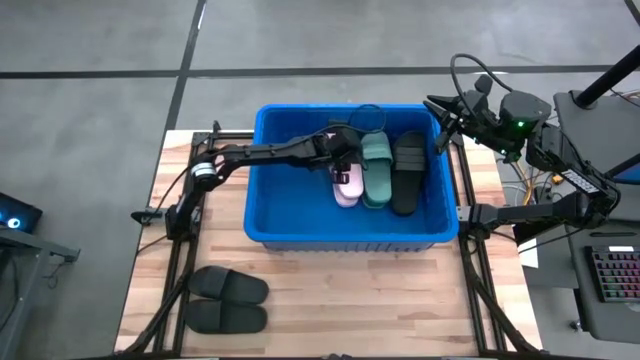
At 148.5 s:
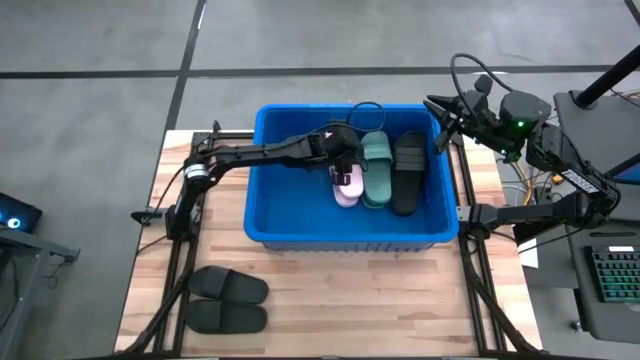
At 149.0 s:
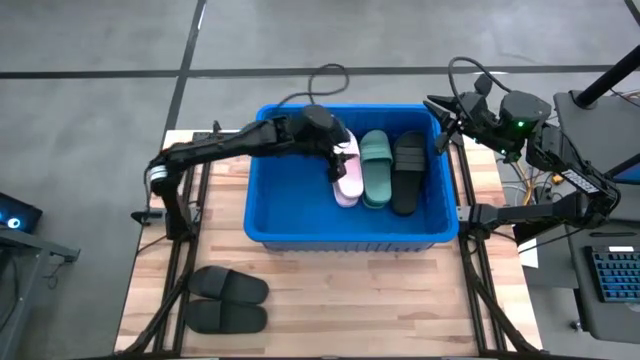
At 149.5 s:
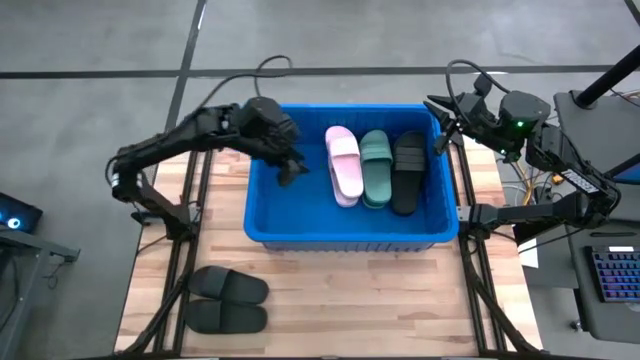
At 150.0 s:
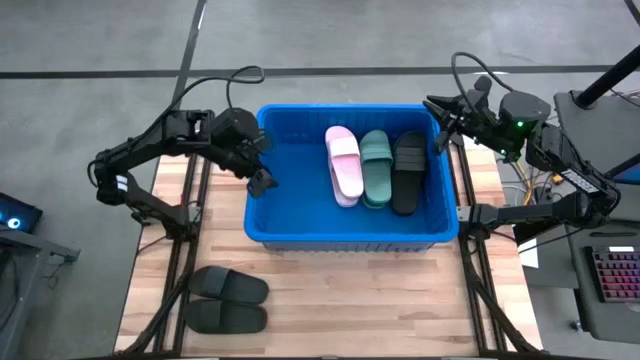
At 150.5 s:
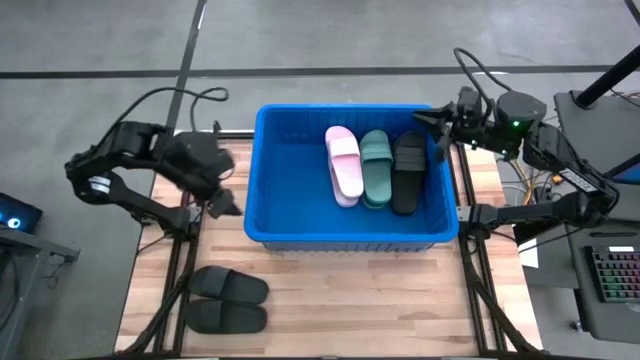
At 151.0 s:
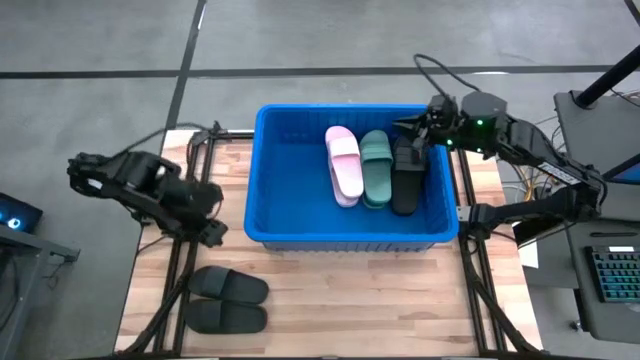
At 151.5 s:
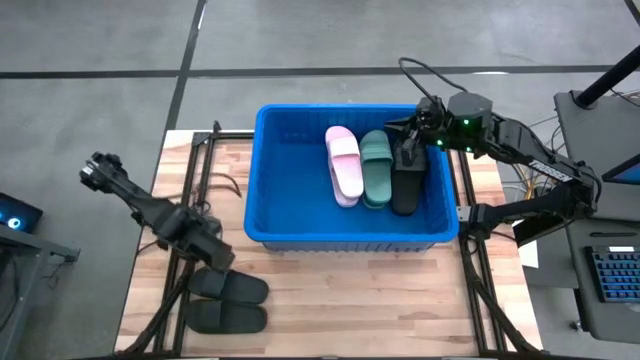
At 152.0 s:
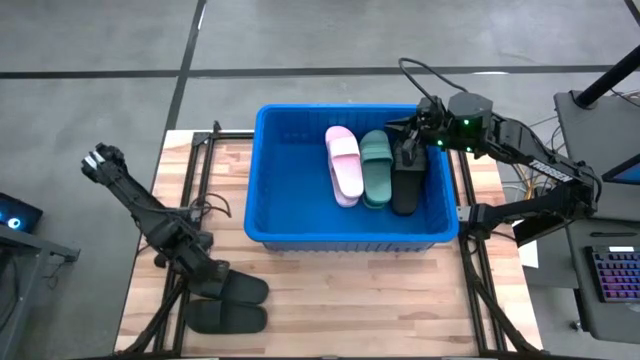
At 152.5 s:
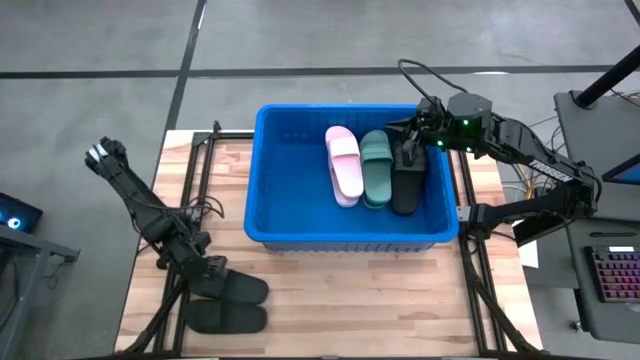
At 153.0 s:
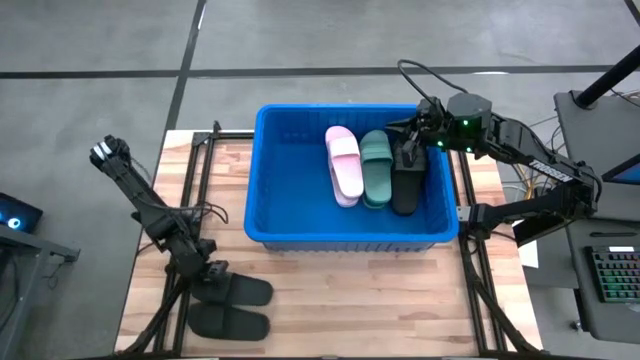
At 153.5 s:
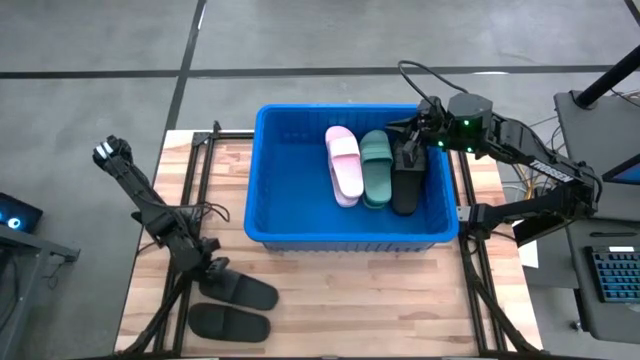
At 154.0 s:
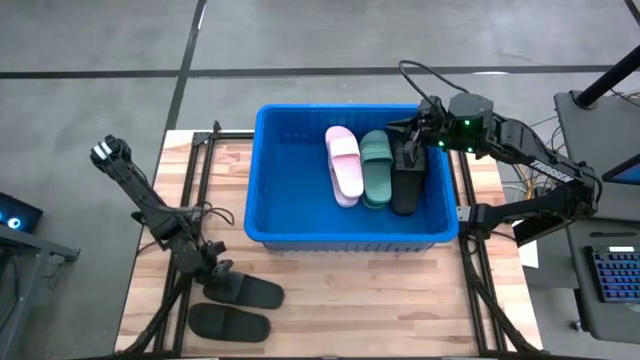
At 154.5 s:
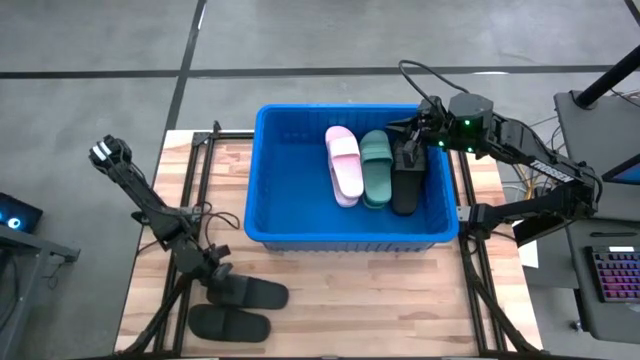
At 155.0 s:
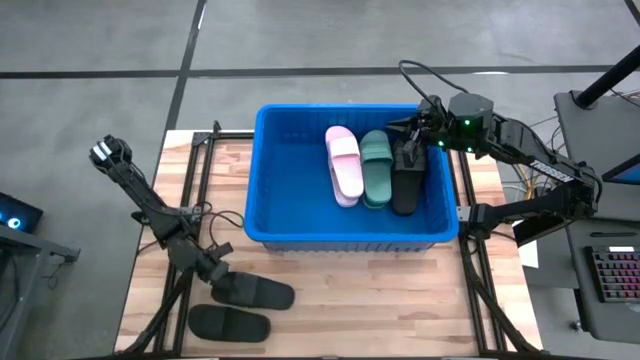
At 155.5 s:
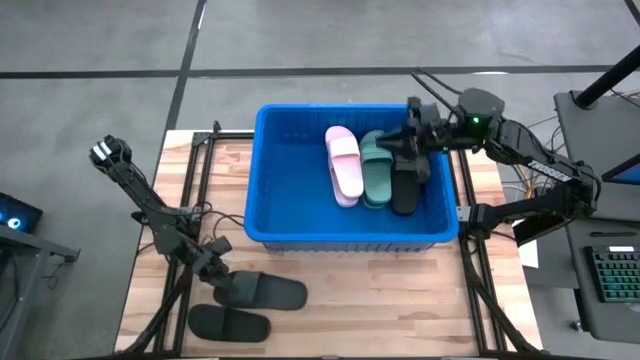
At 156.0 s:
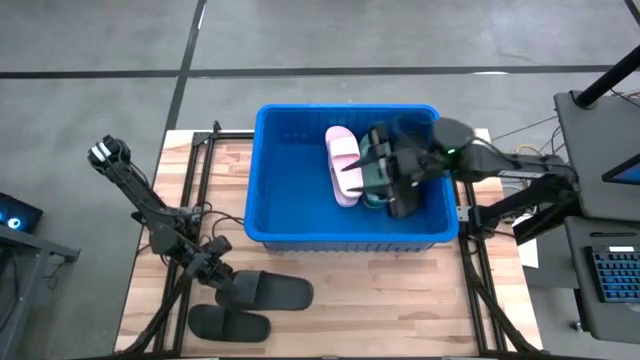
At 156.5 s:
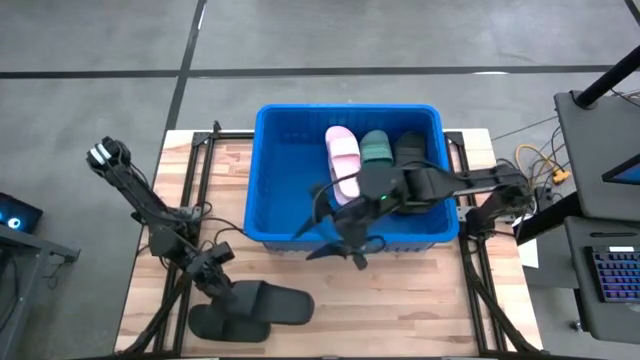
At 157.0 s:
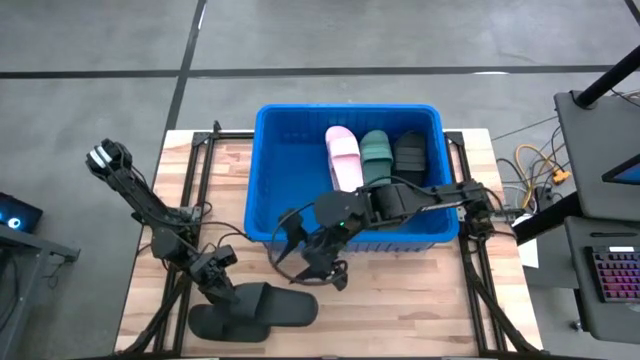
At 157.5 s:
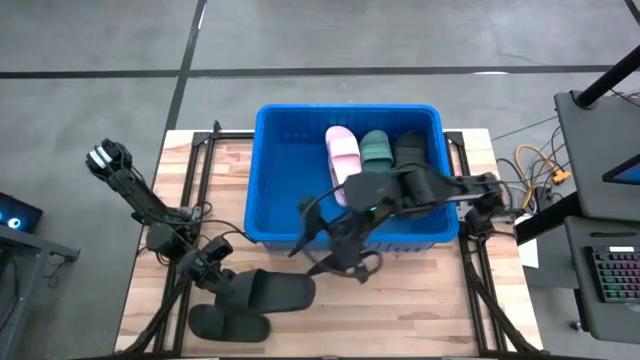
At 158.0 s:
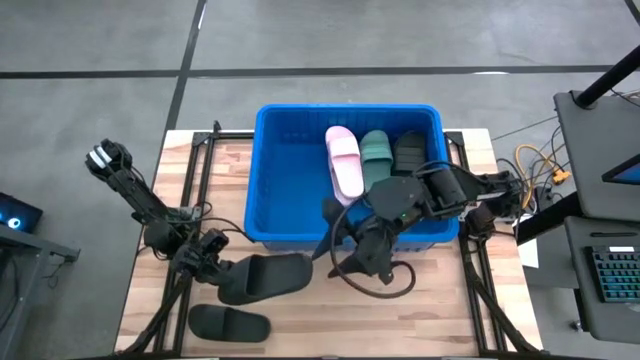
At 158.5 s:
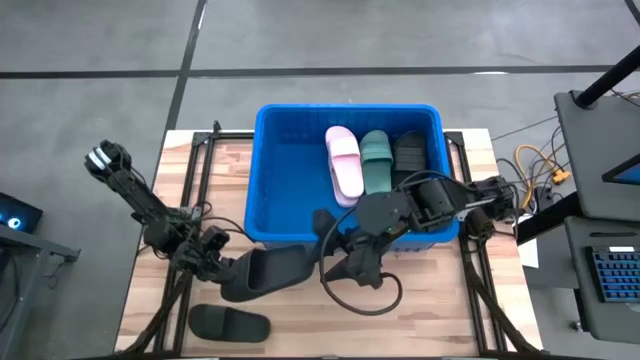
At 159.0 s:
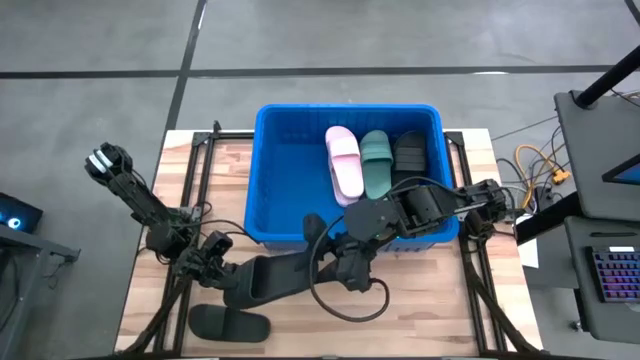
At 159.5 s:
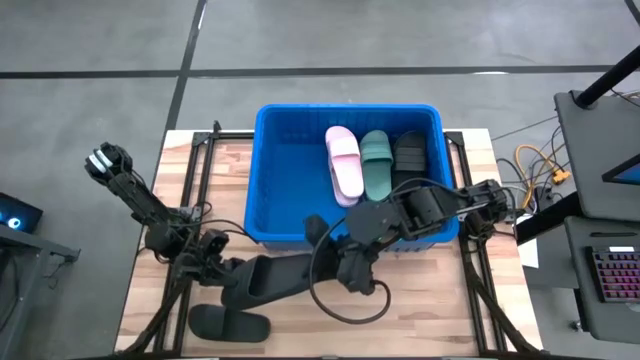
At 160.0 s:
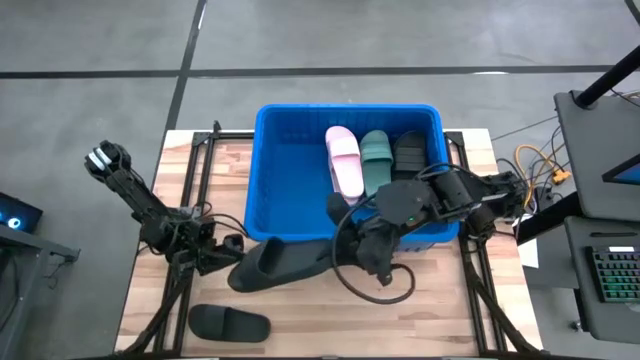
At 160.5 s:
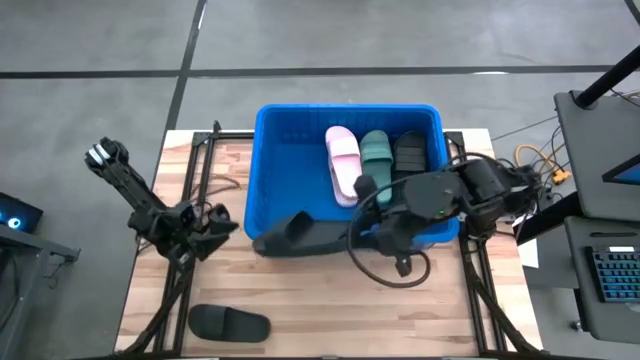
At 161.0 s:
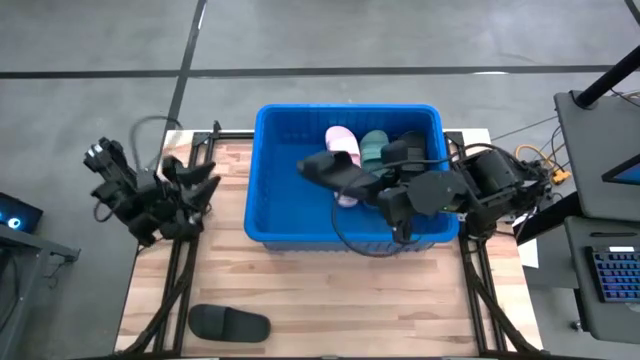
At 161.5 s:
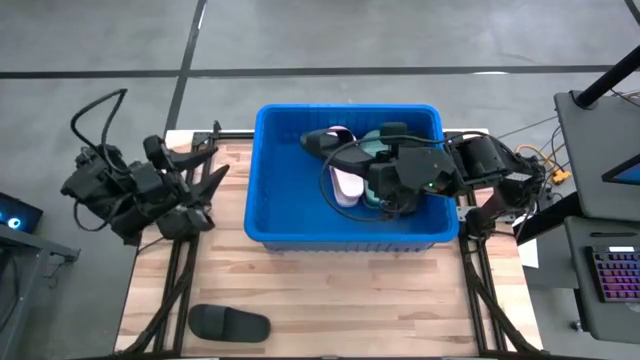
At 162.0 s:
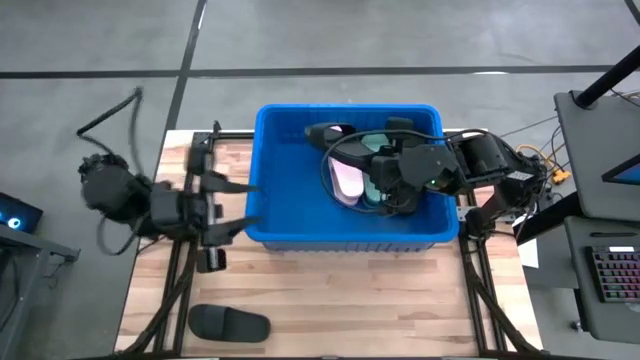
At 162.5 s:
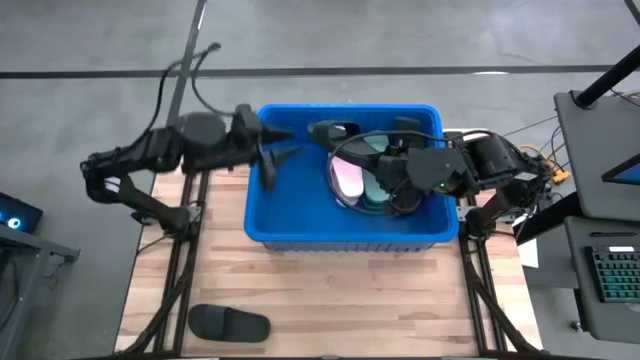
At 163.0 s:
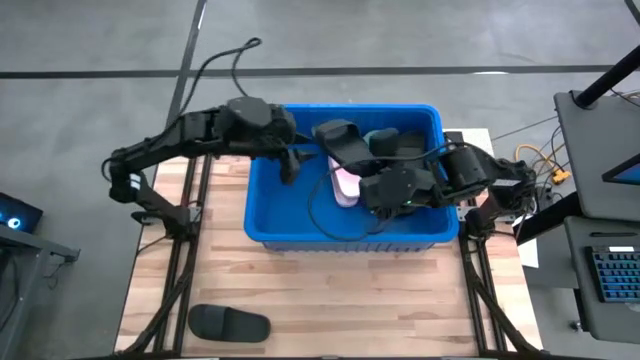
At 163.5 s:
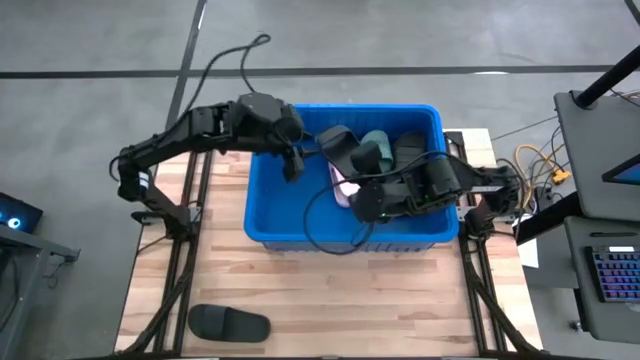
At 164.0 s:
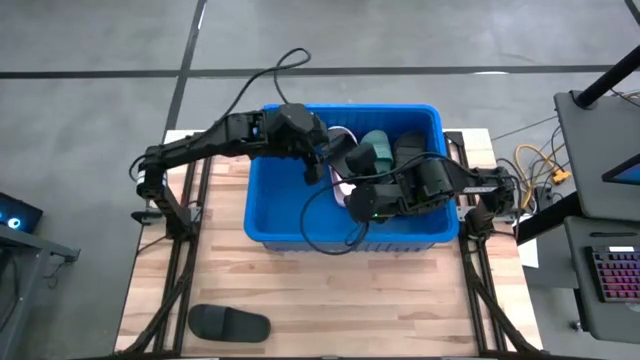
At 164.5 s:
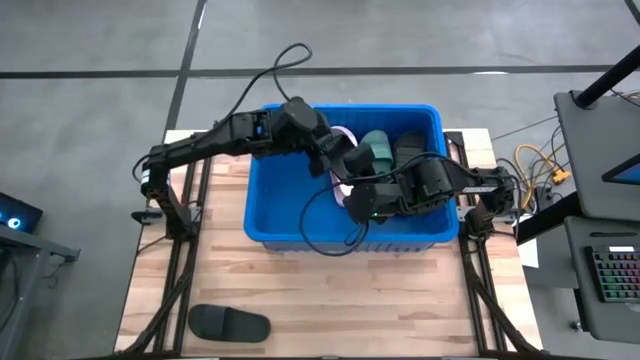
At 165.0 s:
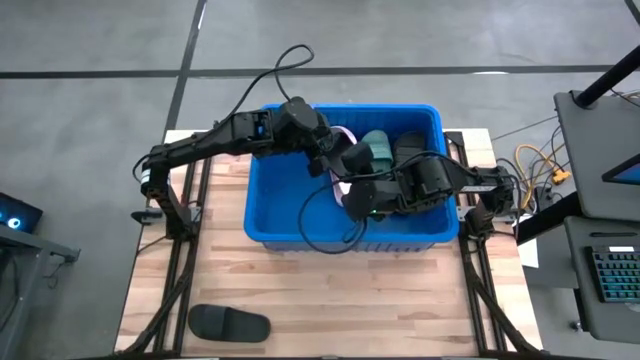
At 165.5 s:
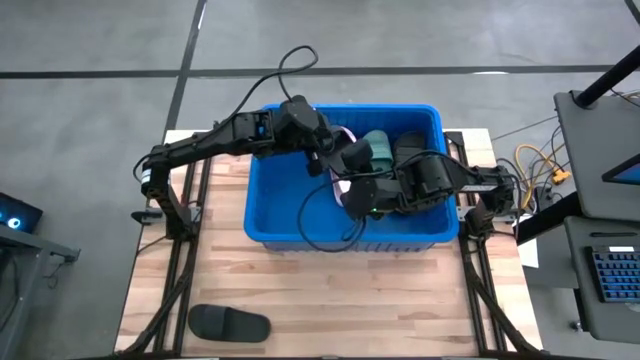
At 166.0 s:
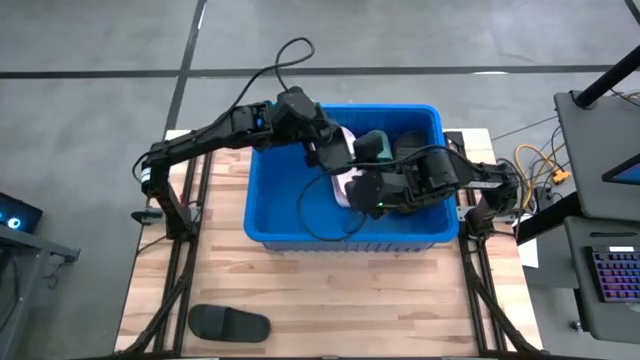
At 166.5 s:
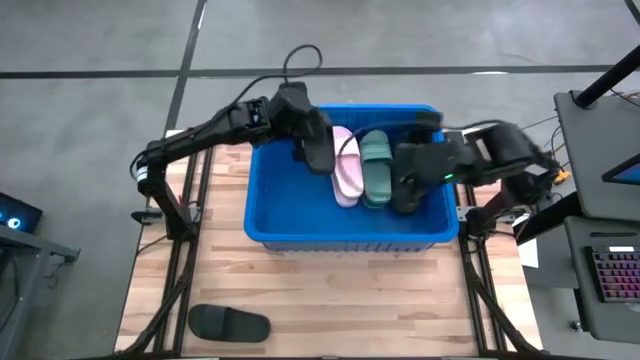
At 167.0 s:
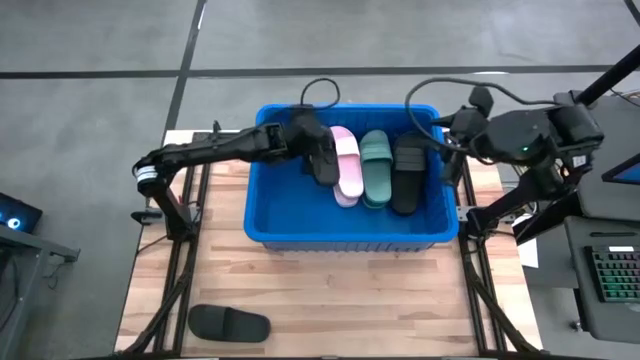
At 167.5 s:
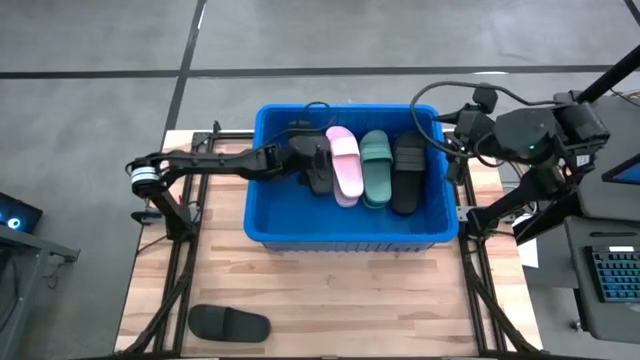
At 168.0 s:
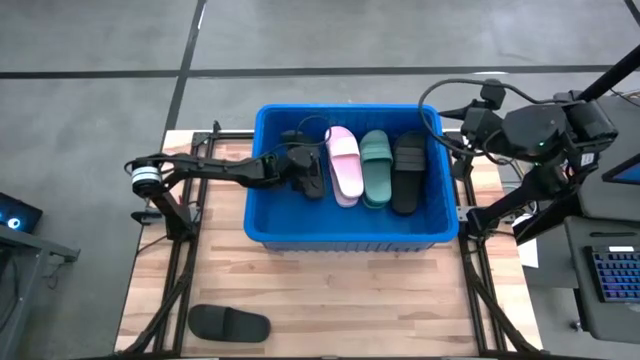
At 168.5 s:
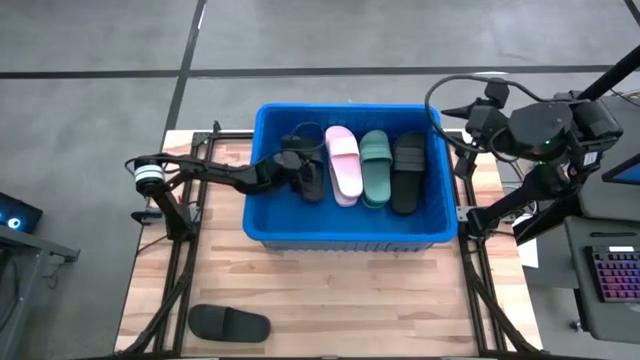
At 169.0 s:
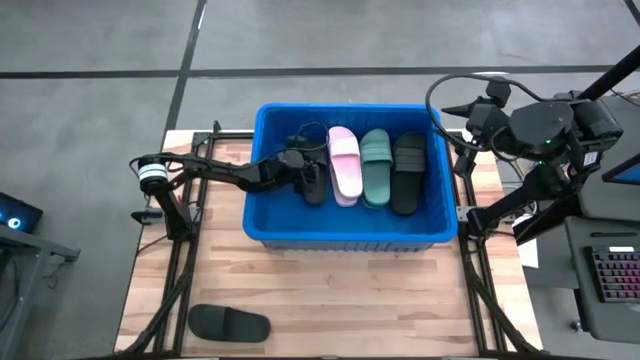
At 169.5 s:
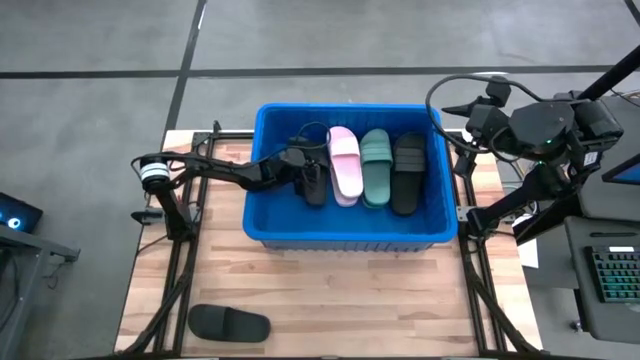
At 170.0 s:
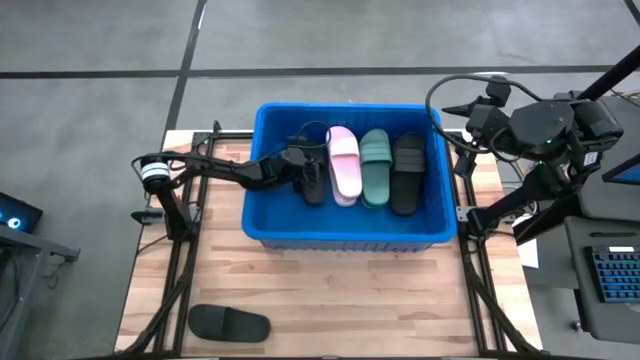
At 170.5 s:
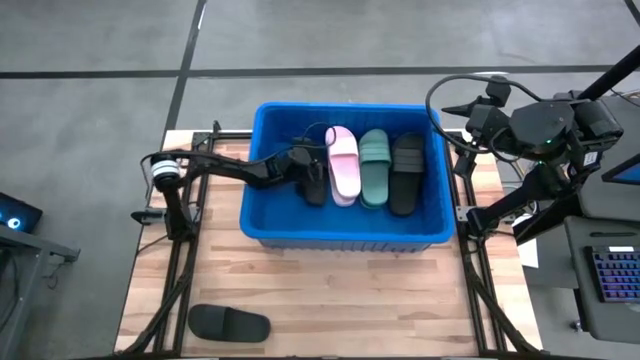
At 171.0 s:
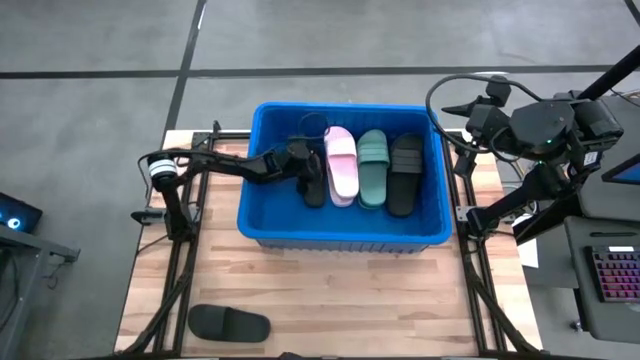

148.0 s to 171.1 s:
Task: Pick and place slides into bin
Put the black slide into the blue bin
